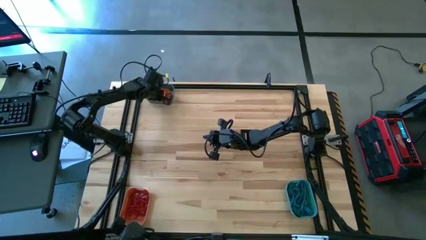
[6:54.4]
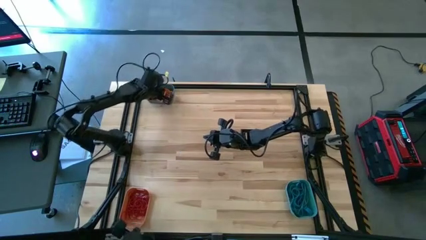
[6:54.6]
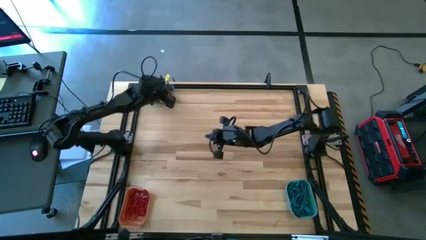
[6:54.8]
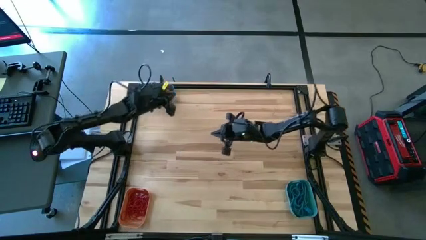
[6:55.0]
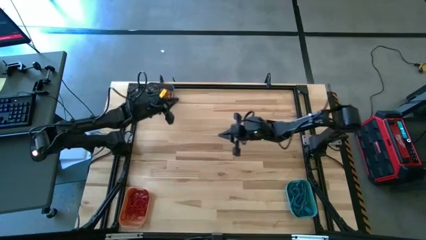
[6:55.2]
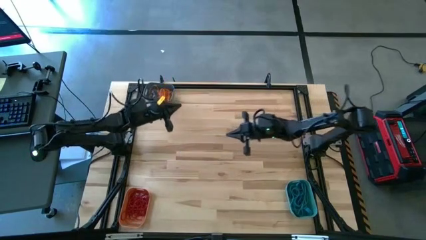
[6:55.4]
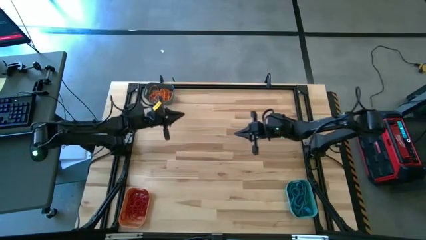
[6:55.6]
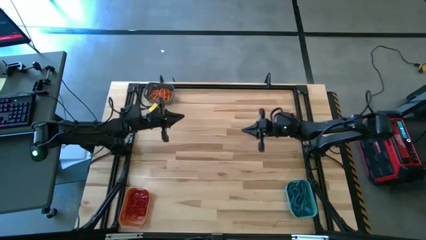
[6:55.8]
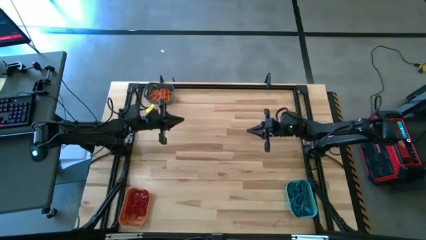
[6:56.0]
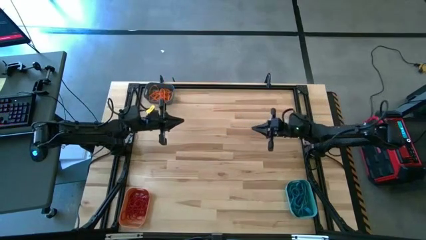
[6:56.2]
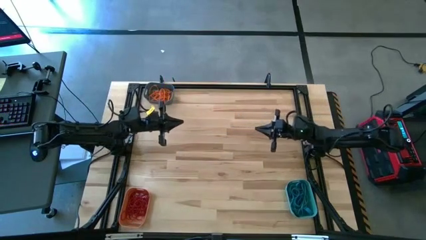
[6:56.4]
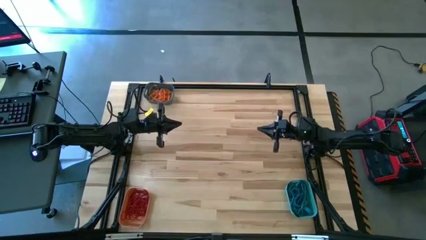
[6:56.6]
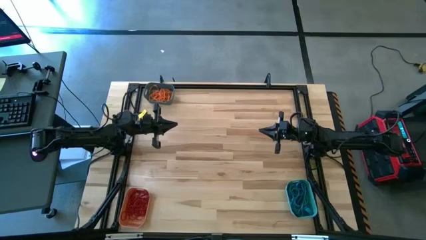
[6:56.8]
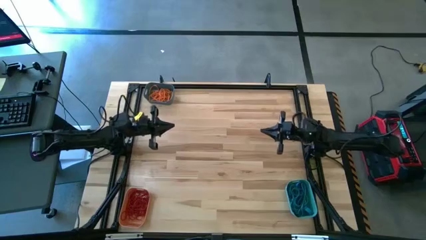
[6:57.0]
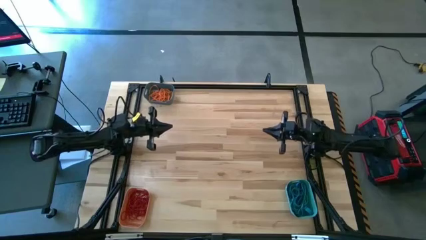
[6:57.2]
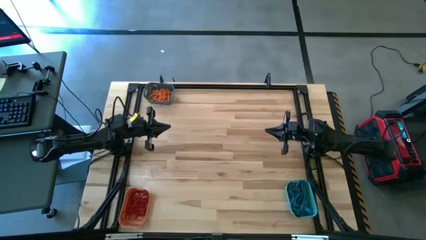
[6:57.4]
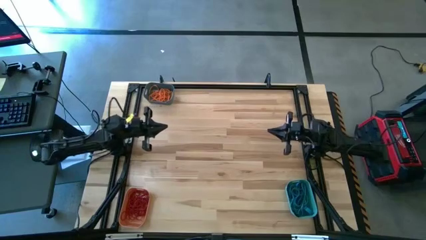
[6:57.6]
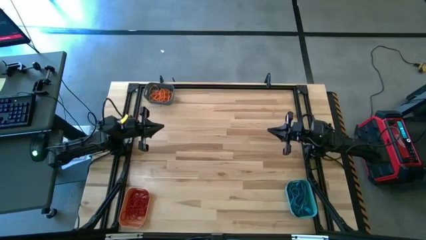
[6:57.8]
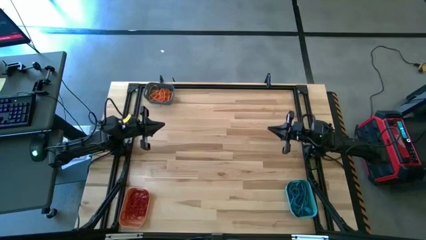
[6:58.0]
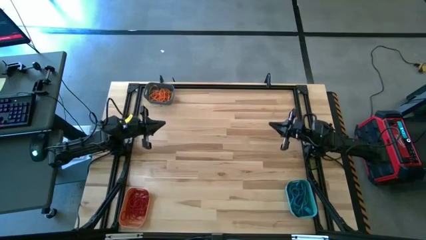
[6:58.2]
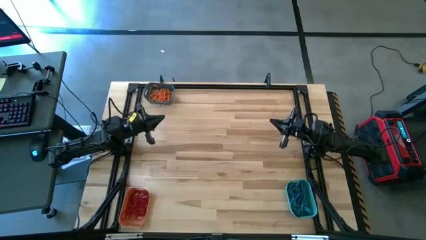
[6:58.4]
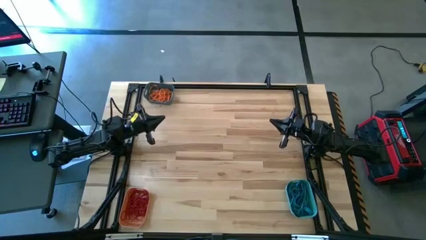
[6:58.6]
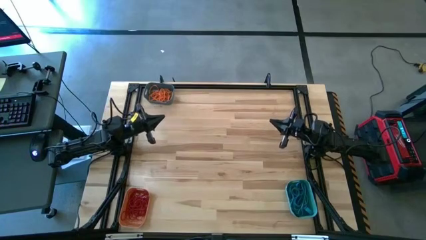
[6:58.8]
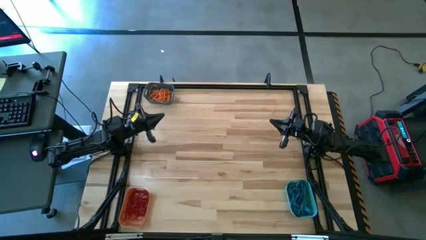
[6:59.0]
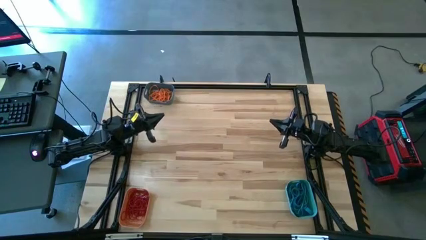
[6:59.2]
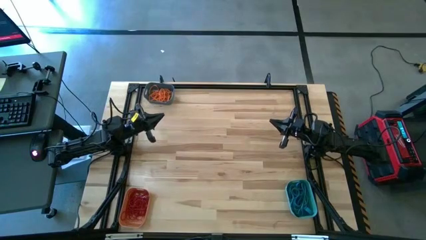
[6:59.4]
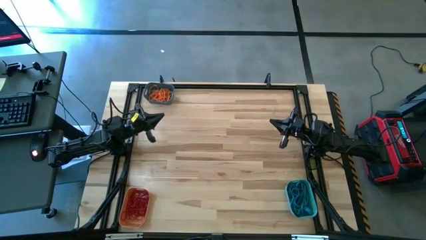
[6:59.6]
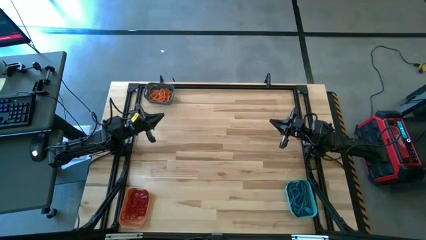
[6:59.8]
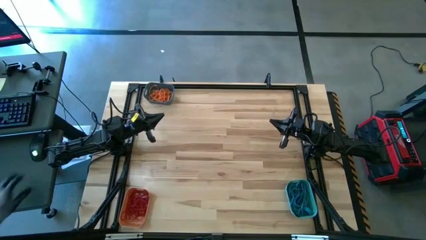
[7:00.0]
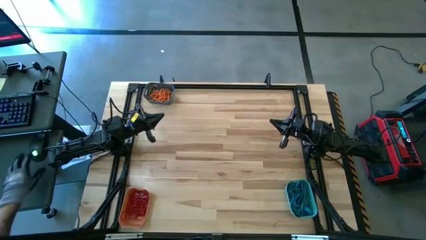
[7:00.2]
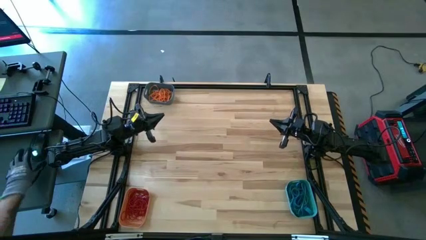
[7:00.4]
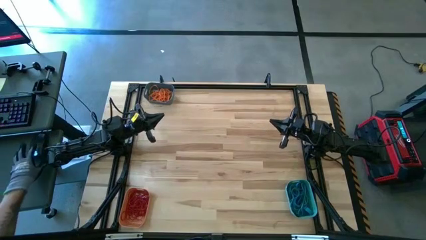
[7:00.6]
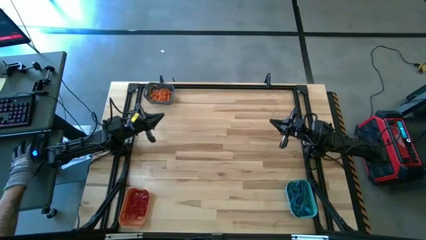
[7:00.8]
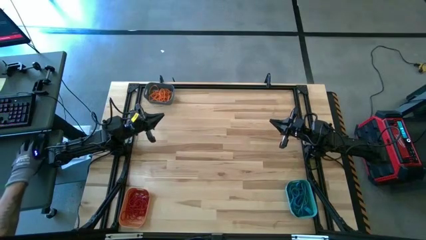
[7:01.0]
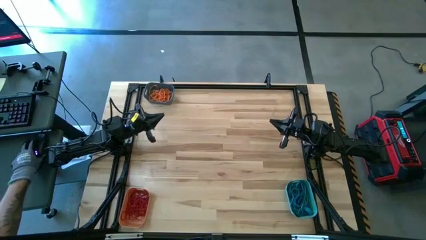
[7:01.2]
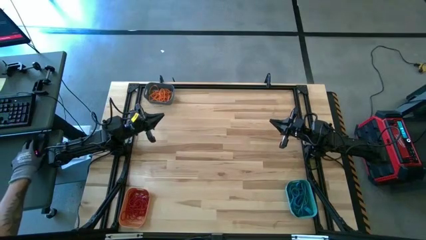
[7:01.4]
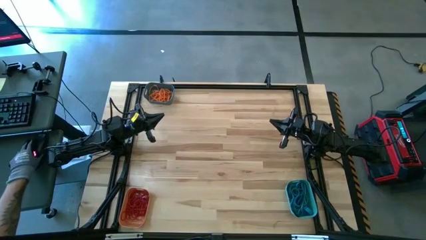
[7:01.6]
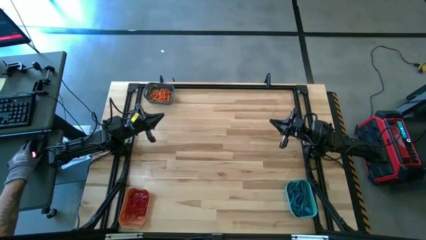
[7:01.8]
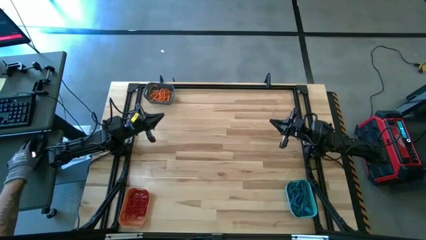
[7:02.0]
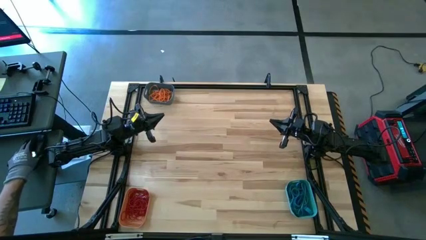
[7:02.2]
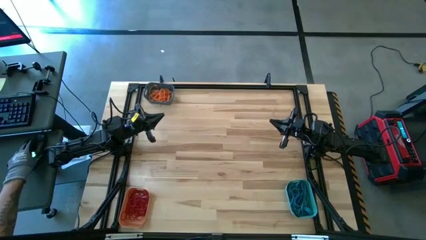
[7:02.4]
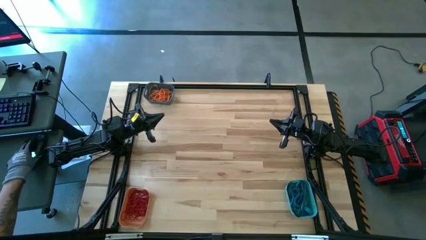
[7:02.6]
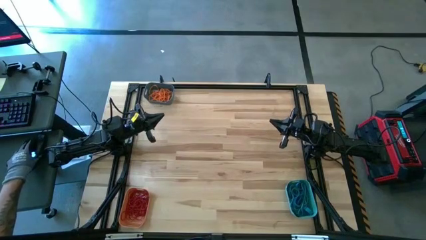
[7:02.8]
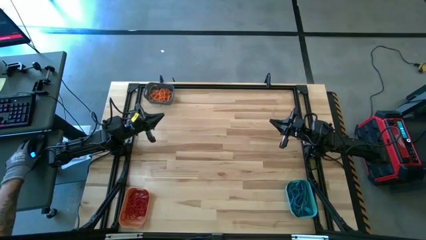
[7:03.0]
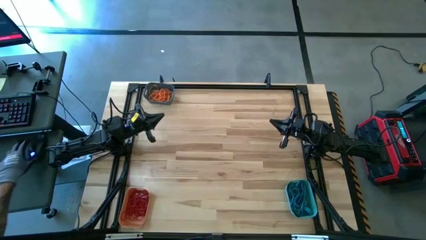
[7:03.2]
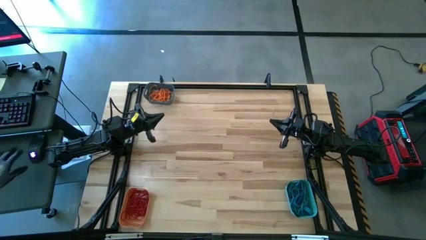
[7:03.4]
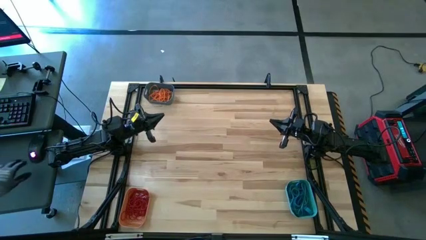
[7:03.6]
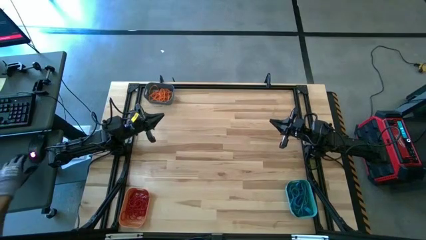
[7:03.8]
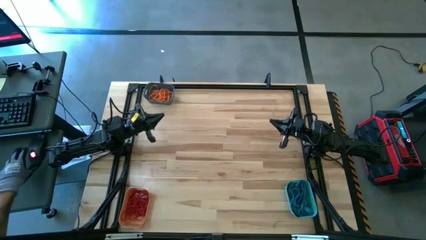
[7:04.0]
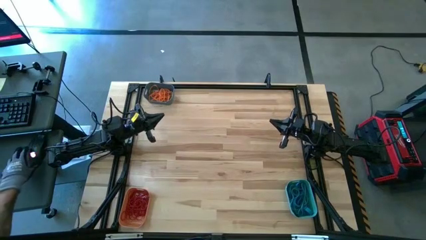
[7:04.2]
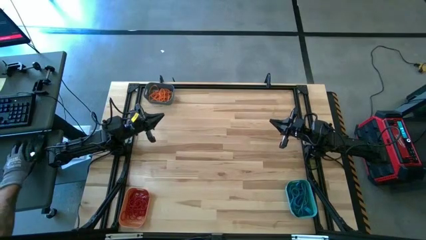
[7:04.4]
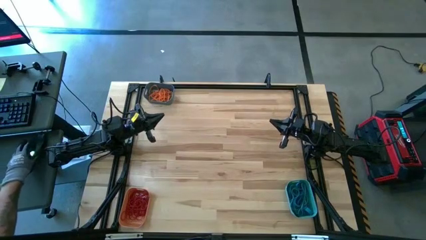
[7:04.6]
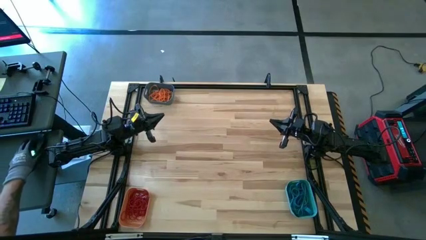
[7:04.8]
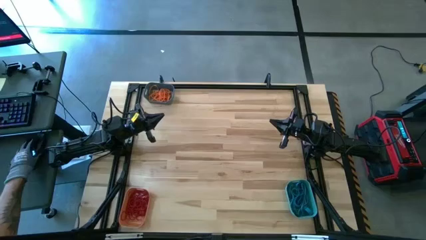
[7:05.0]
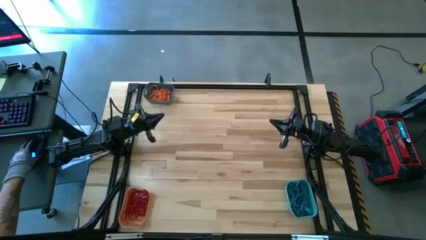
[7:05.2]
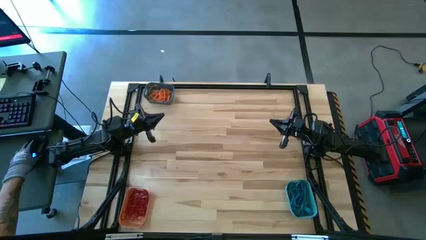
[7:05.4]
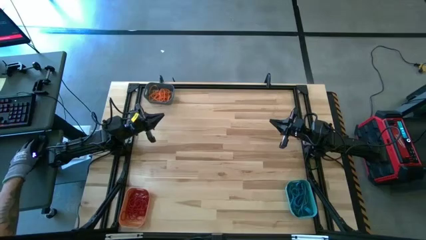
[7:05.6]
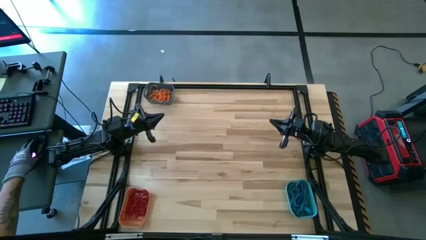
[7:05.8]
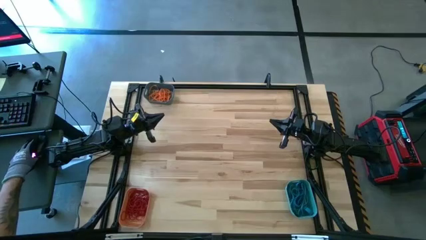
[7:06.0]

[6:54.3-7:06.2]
Task: Sort rubber bands into baskets
Return to Home Position

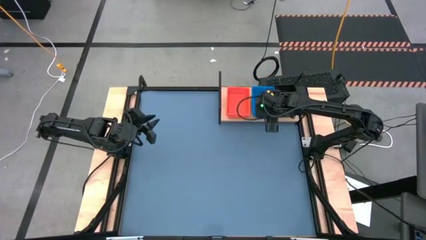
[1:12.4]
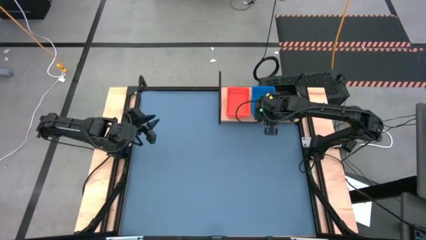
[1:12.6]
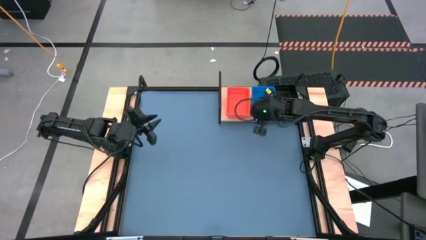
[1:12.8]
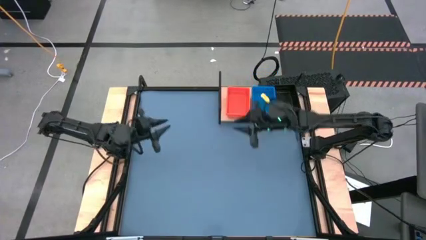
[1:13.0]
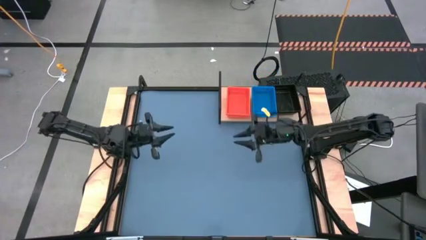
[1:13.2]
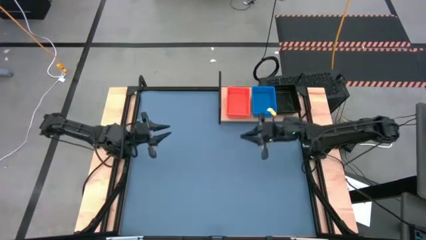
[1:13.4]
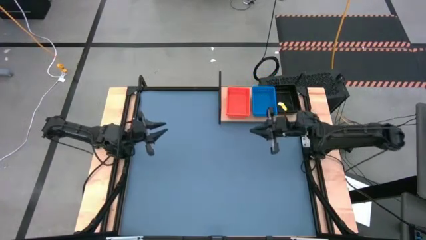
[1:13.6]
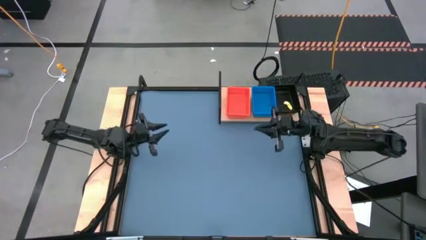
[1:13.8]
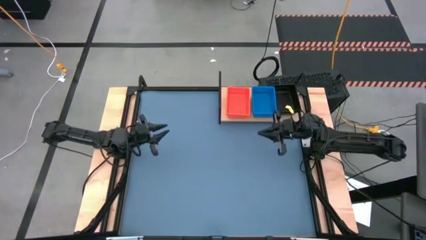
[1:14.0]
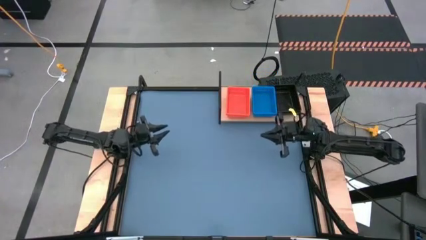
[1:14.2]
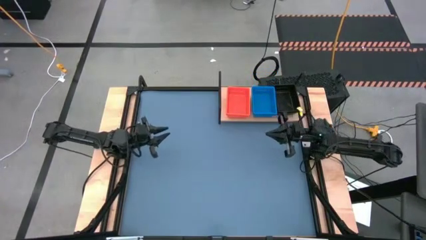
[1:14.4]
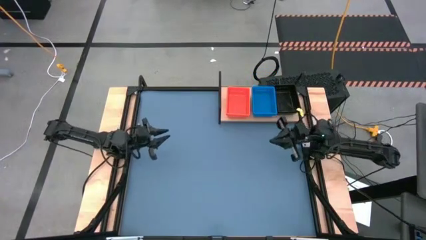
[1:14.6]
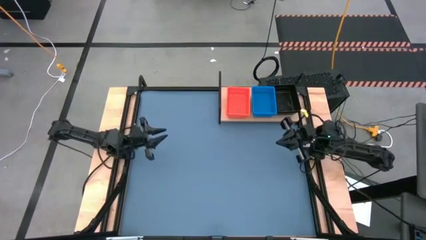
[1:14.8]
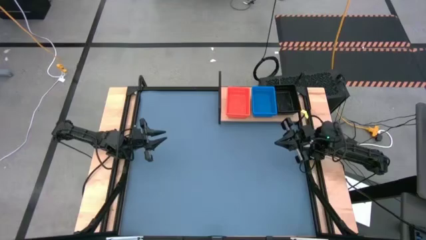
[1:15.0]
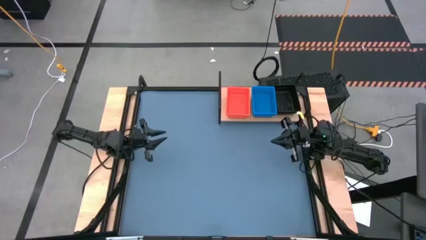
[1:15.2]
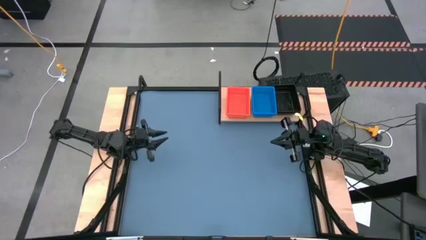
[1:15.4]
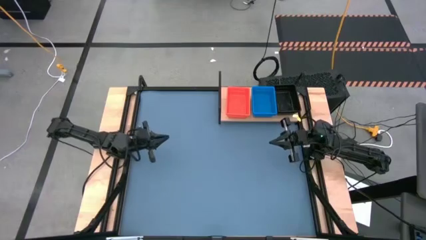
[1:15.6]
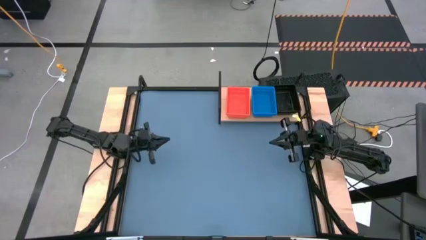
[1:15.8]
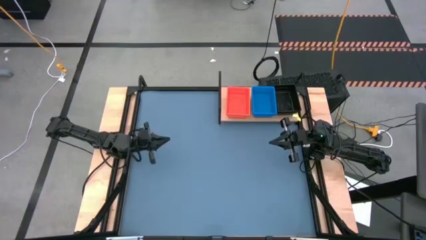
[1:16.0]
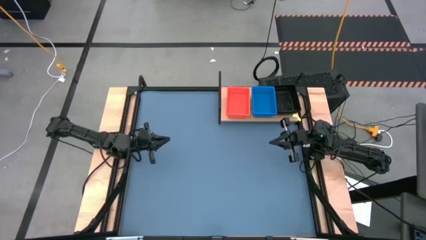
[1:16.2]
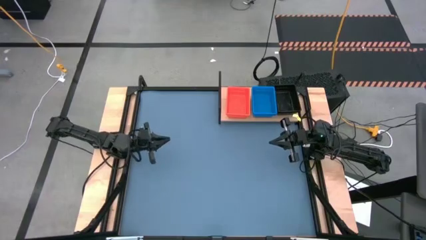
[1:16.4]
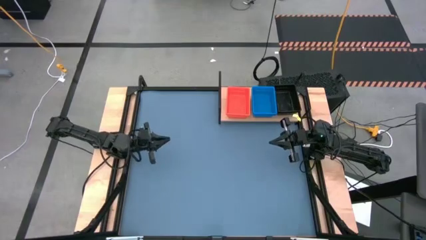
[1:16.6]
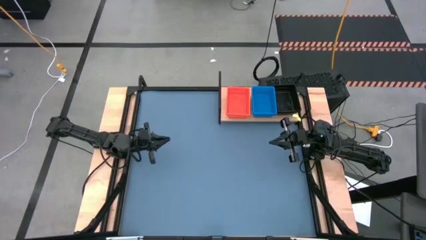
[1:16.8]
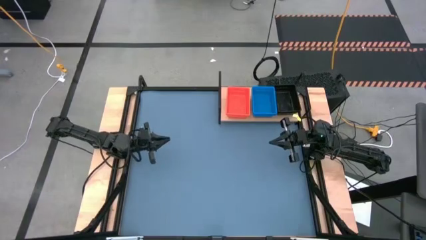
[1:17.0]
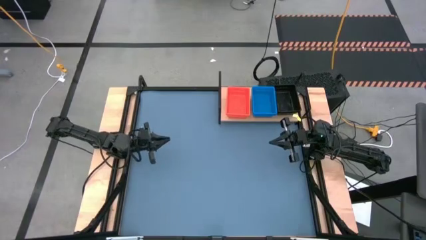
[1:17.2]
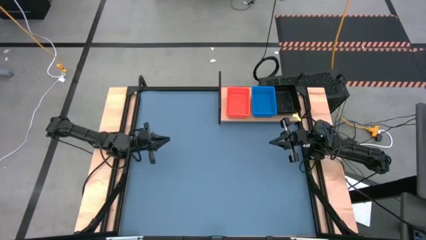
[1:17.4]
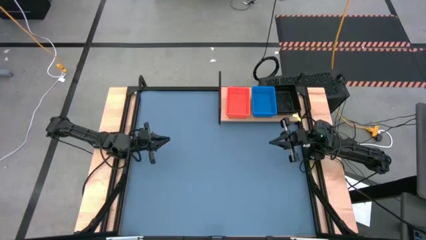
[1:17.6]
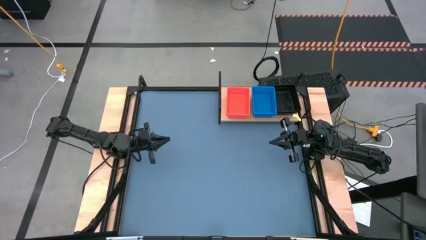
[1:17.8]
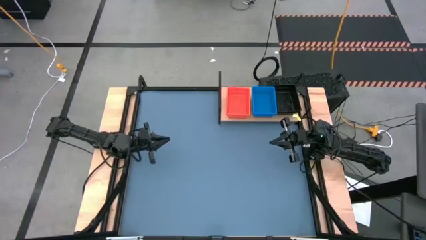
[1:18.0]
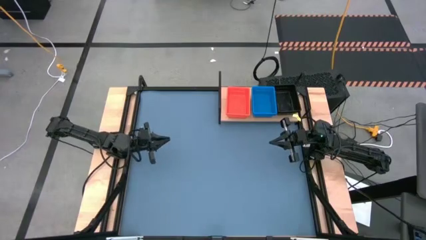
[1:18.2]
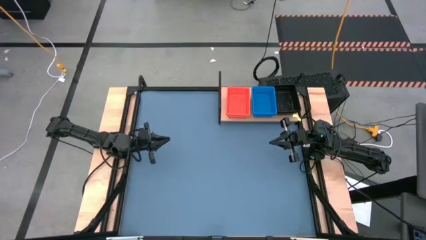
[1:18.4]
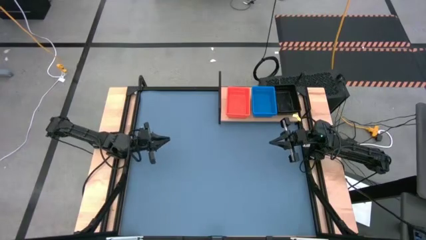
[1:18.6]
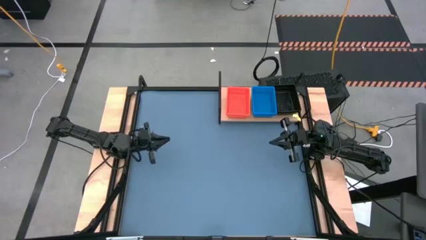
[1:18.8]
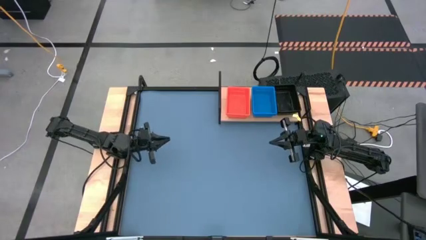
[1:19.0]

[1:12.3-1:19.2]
Task: Stack baskets on shelf by color
Return to Home Position
